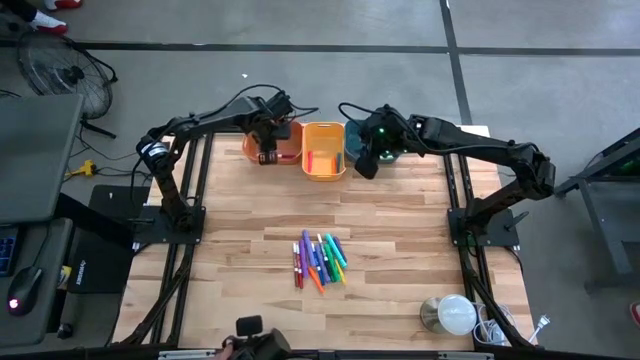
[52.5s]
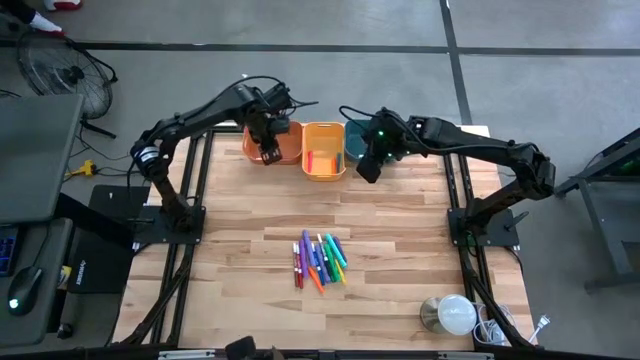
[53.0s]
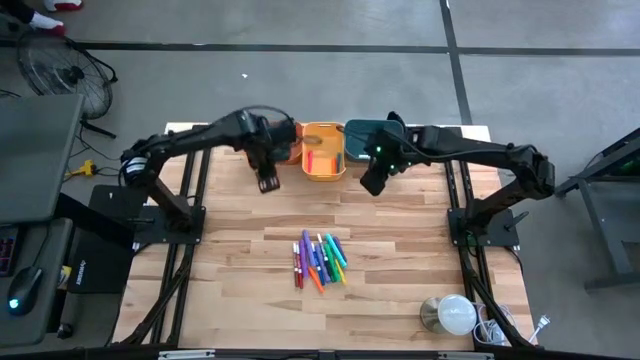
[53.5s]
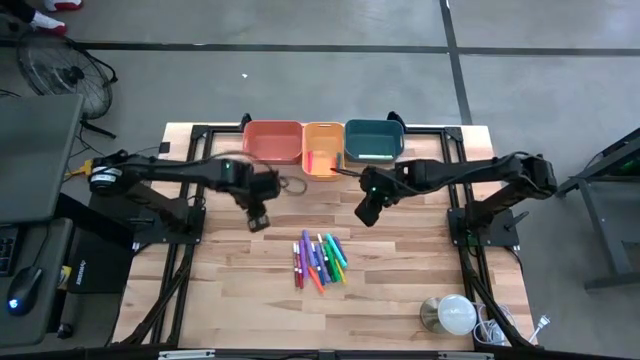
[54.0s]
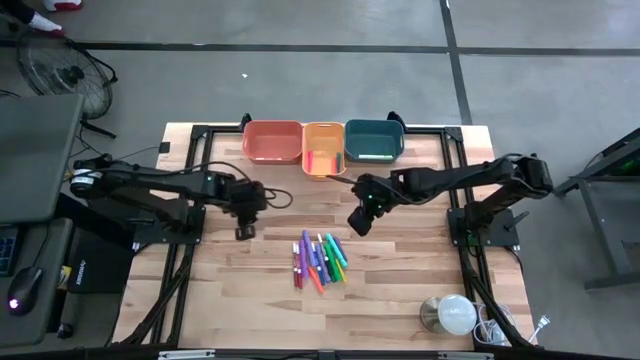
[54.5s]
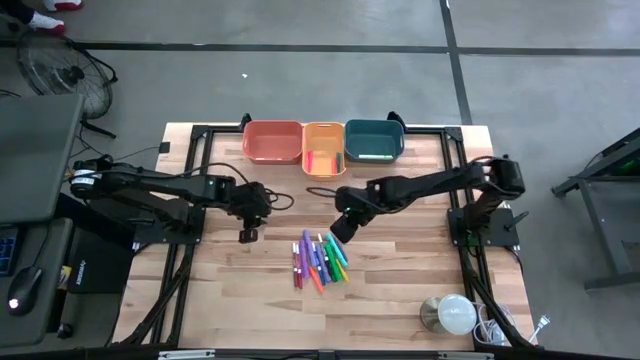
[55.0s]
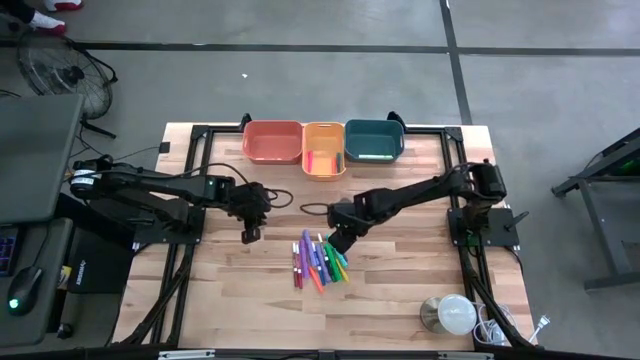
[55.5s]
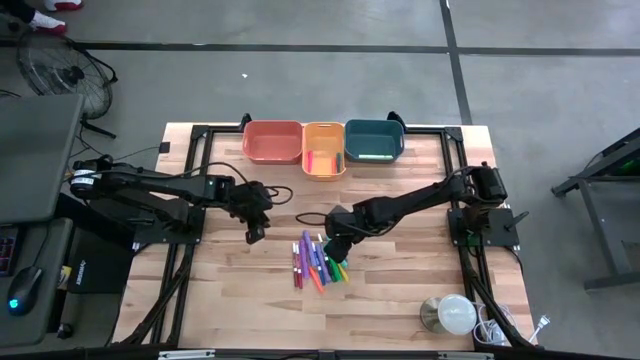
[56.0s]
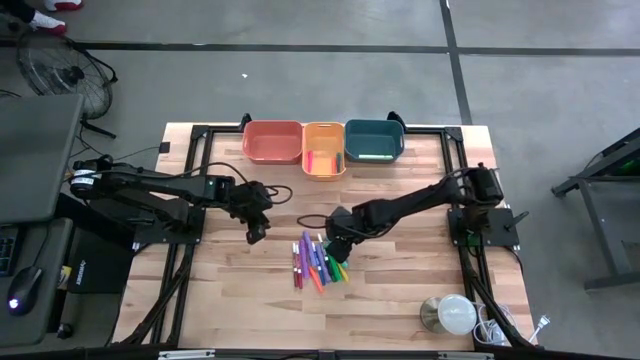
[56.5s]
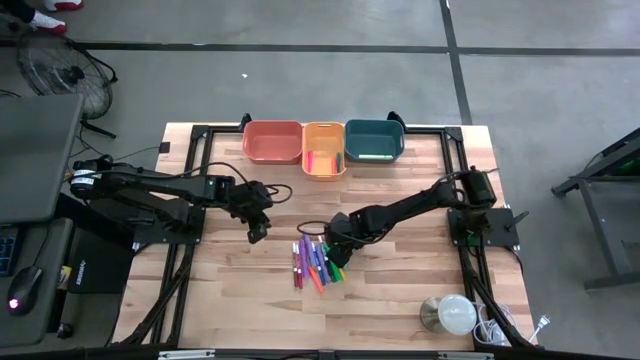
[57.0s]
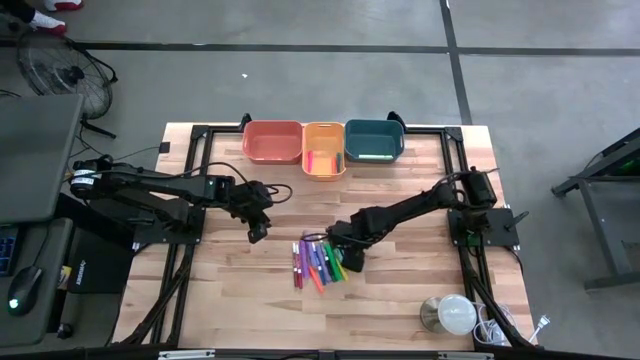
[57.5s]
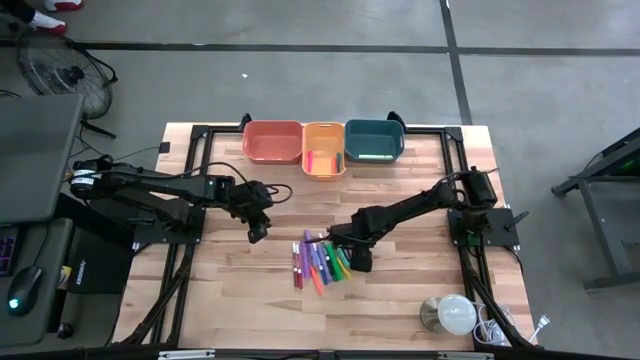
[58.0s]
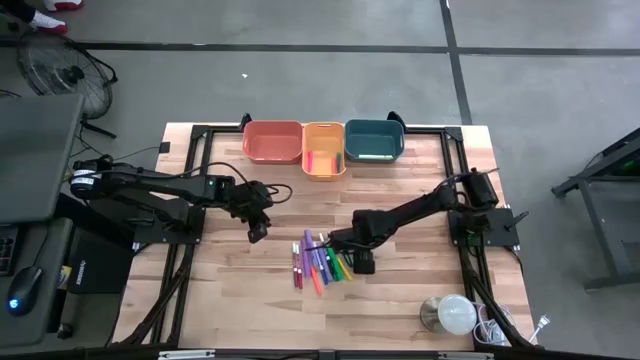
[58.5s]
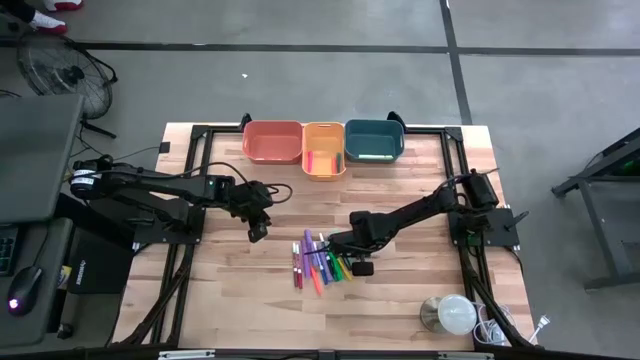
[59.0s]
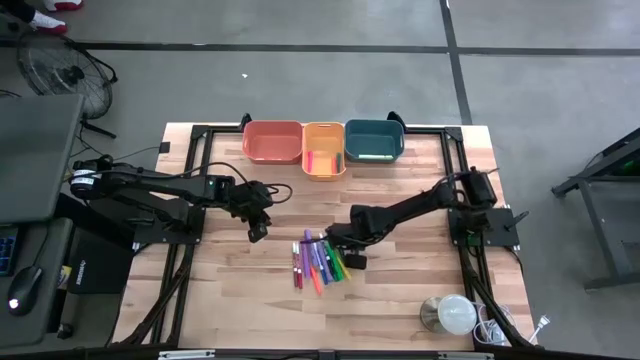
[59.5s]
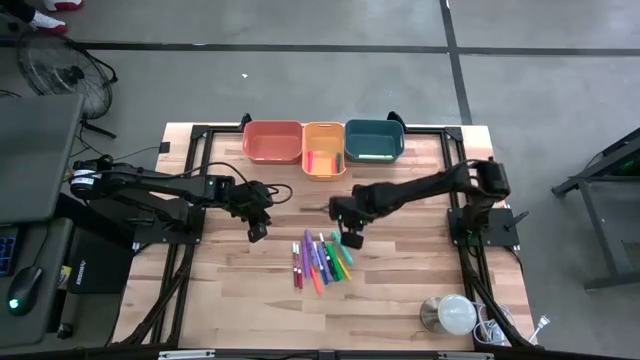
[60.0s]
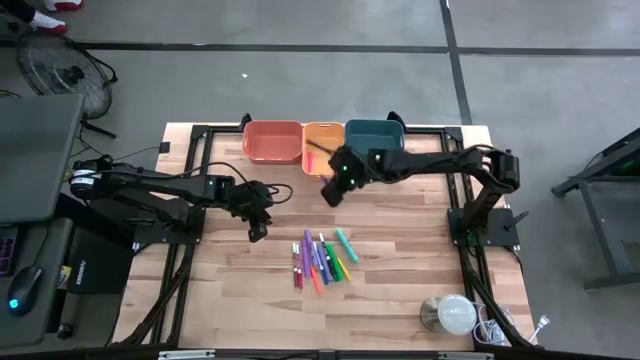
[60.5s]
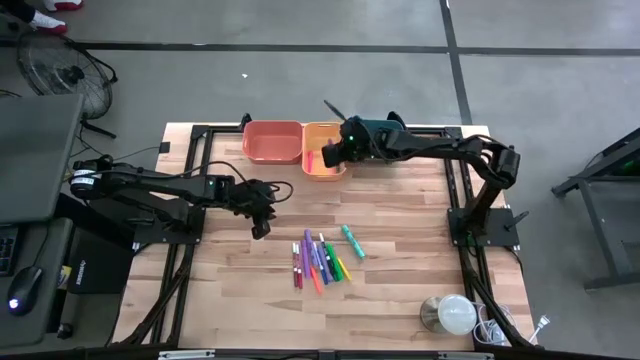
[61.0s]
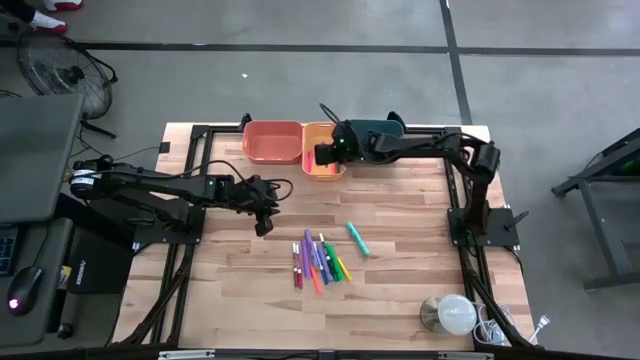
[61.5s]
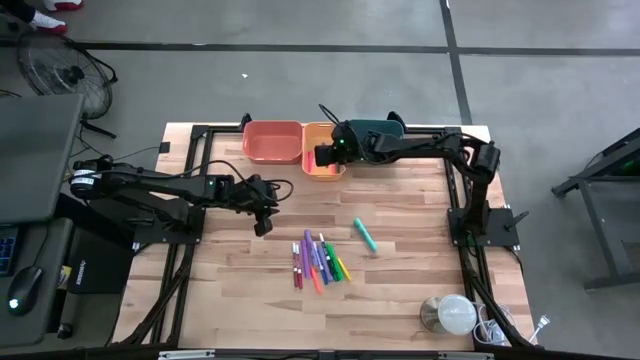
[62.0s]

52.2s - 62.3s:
Task: Pick & Place Markers
Put the purple pen into the yellow bin

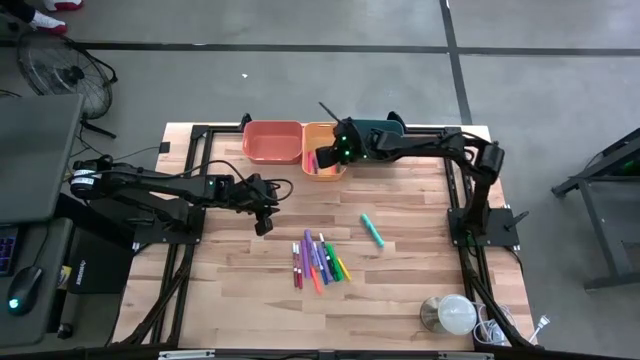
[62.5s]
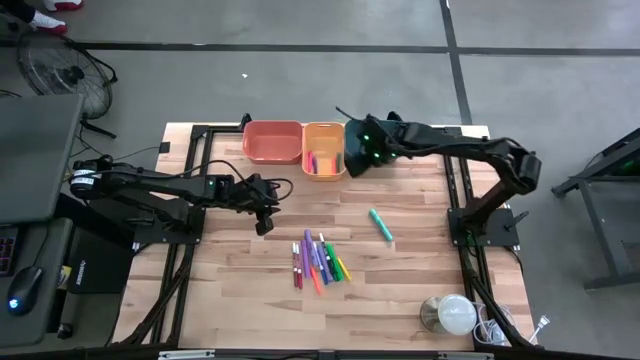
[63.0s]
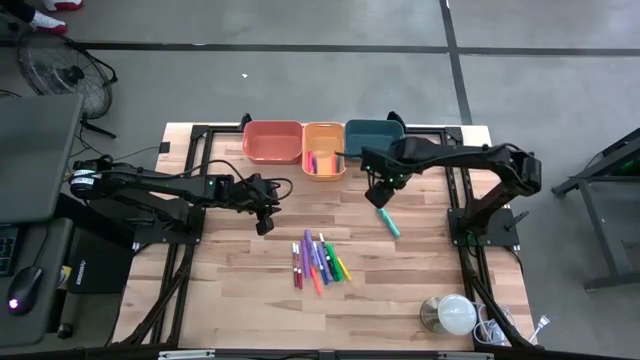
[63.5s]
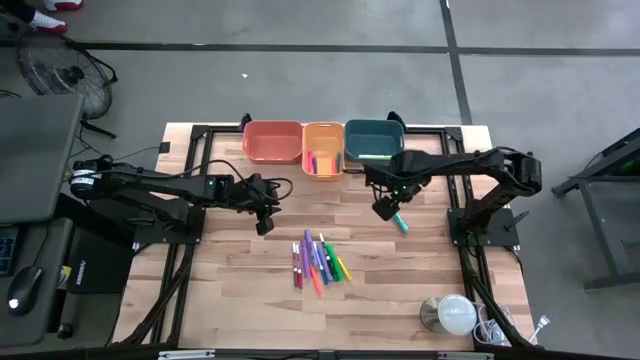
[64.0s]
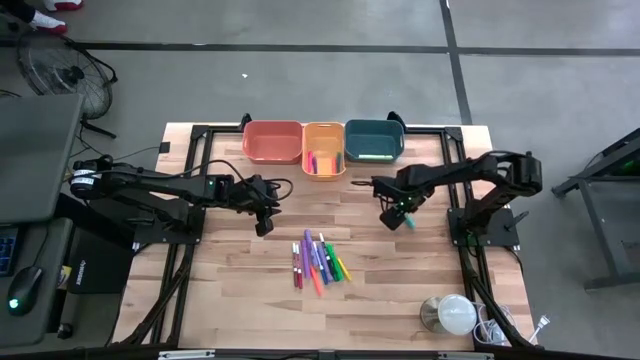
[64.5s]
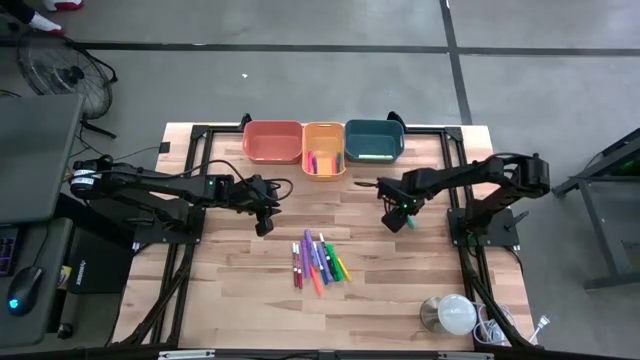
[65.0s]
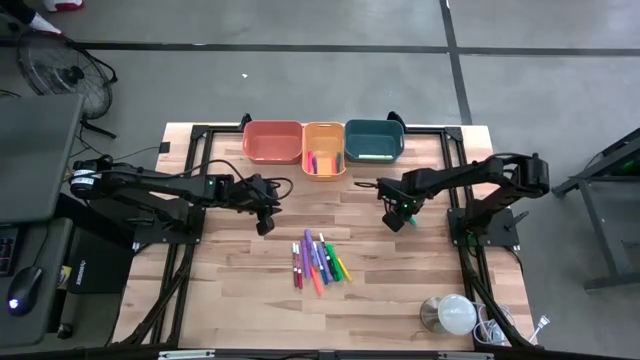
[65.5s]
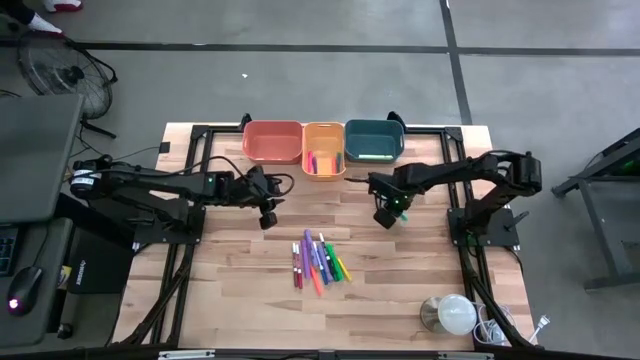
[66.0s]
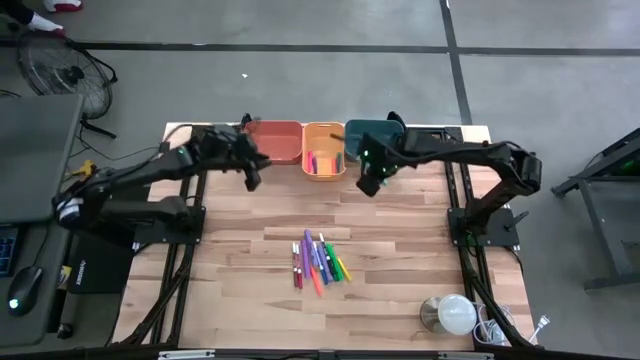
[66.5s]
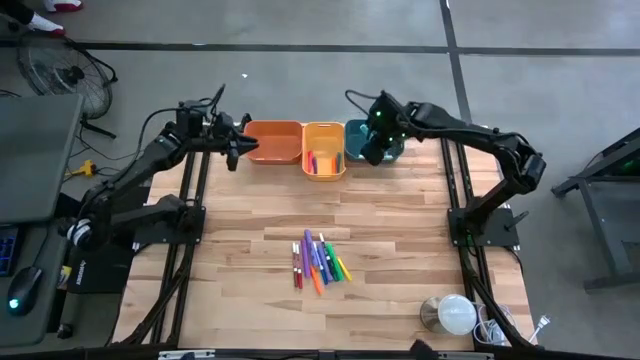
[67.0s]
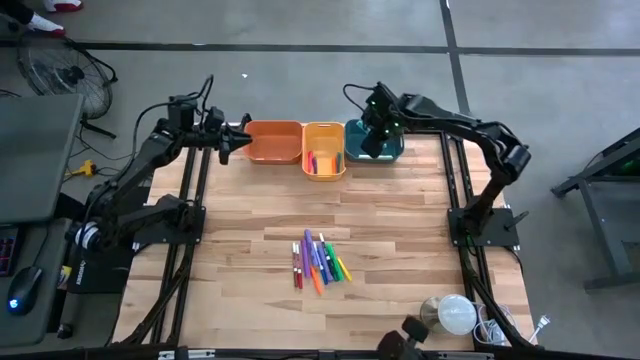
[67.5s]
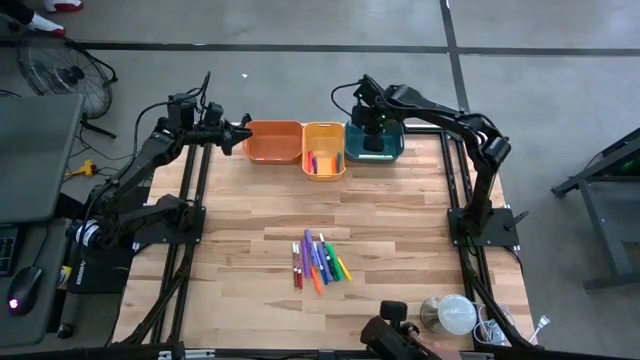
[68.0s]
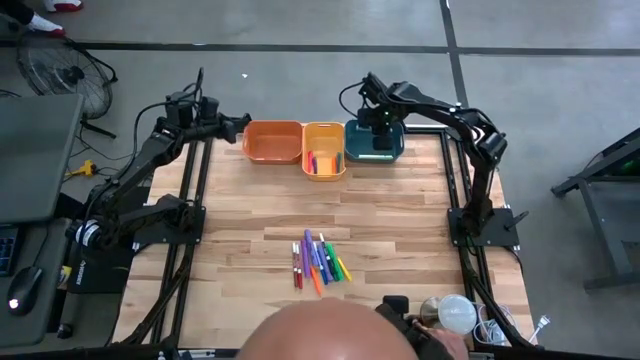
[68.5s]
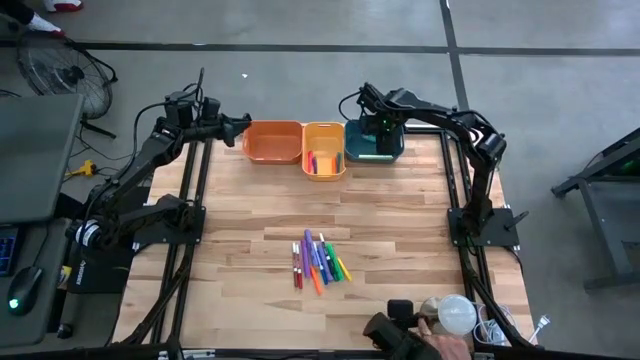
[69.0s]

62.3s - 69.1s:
Put the light blue highlighter into the blue bin
